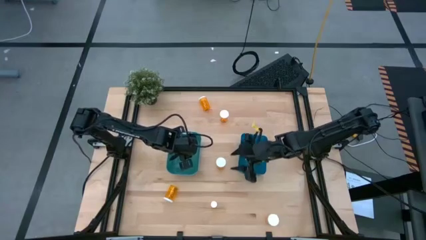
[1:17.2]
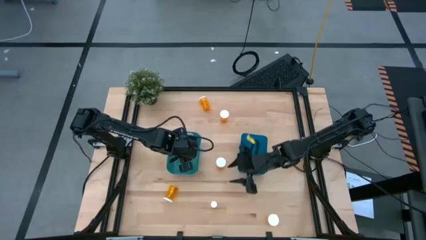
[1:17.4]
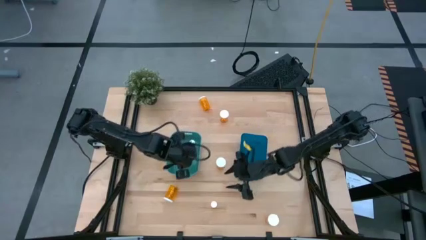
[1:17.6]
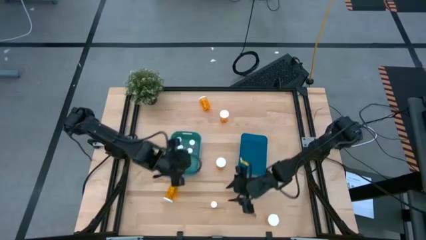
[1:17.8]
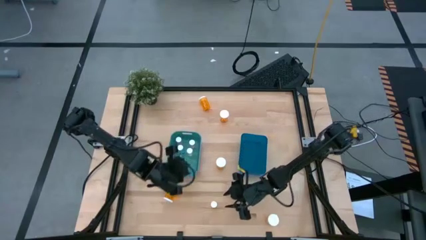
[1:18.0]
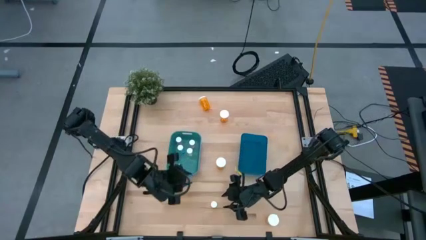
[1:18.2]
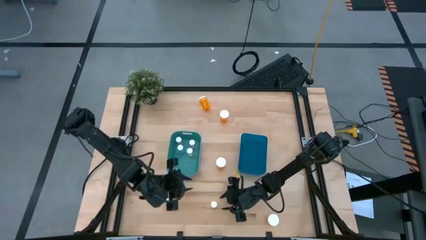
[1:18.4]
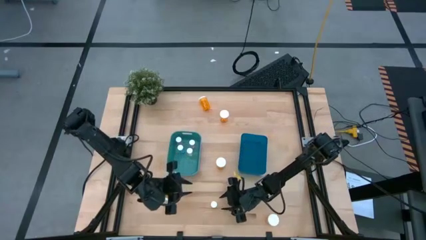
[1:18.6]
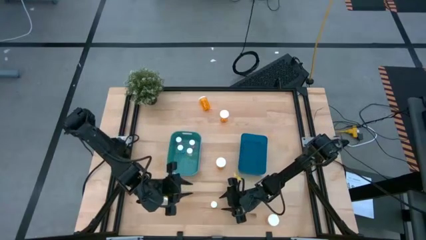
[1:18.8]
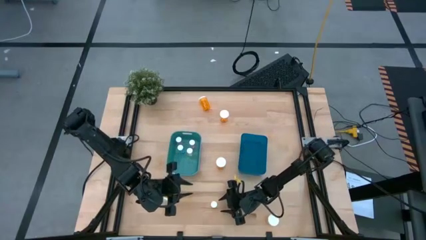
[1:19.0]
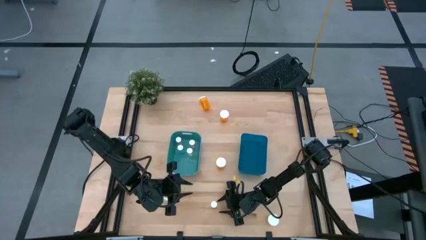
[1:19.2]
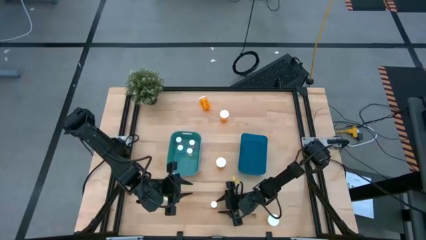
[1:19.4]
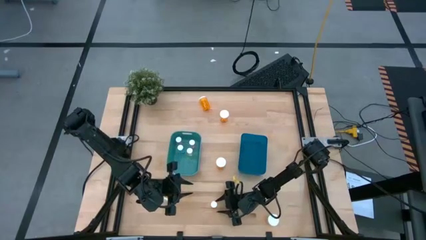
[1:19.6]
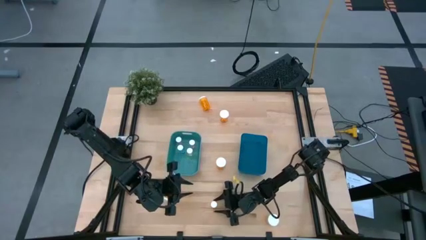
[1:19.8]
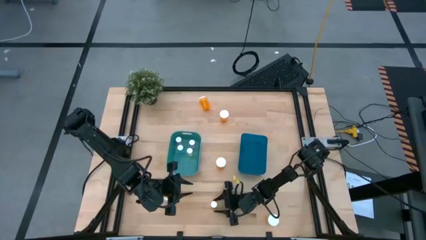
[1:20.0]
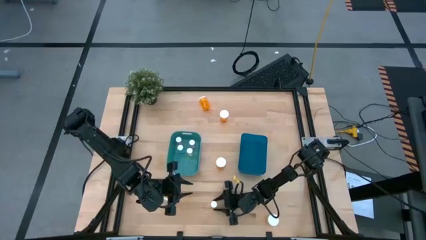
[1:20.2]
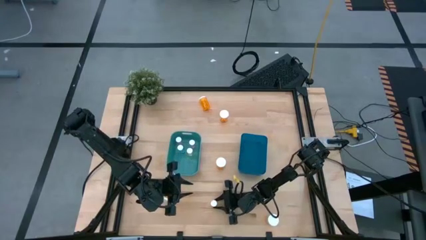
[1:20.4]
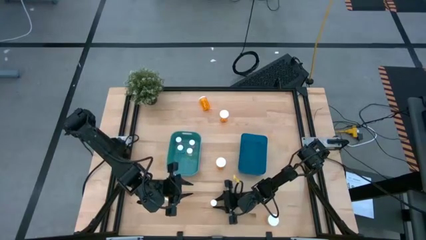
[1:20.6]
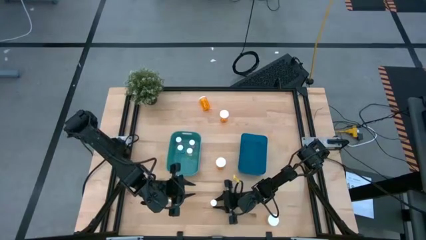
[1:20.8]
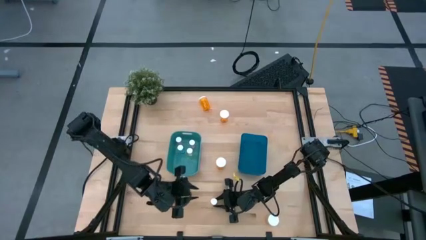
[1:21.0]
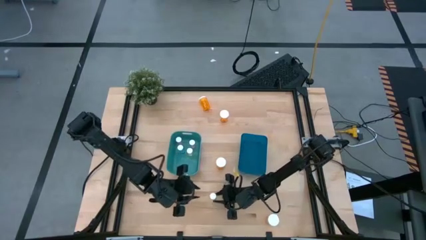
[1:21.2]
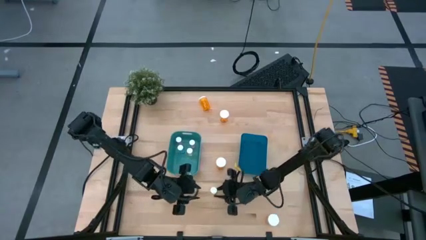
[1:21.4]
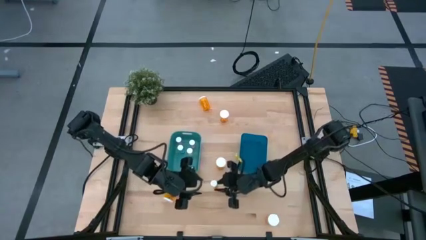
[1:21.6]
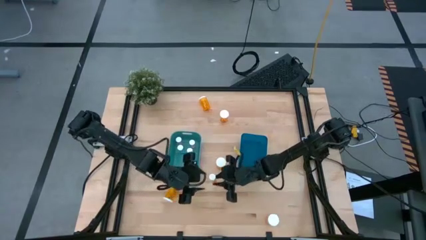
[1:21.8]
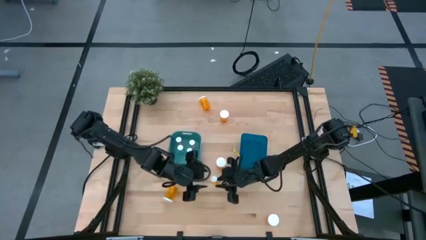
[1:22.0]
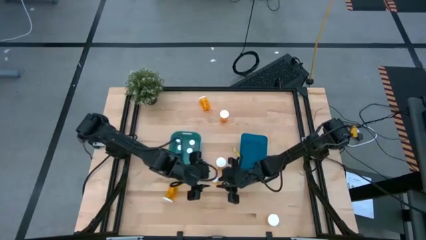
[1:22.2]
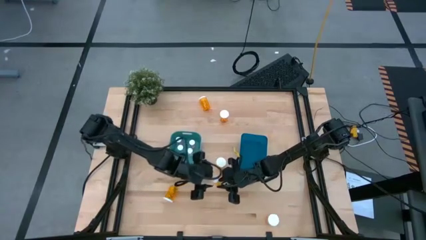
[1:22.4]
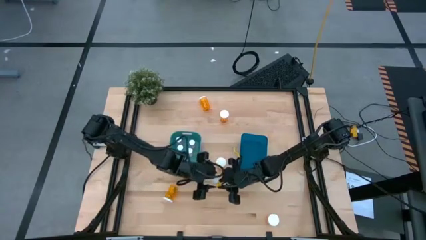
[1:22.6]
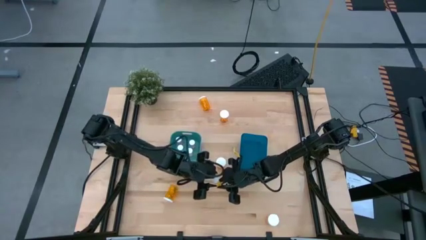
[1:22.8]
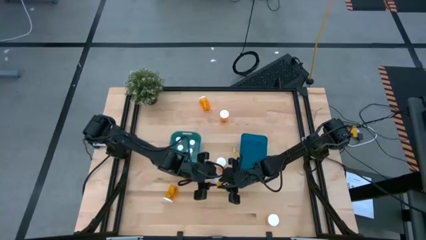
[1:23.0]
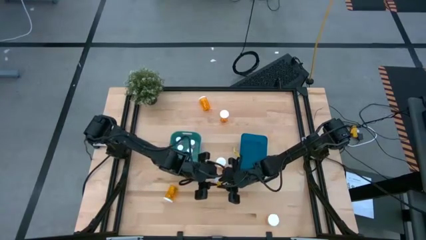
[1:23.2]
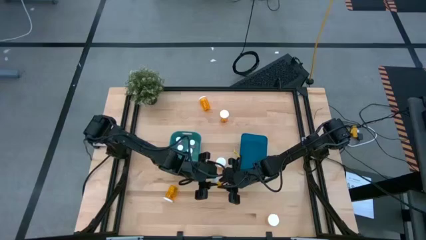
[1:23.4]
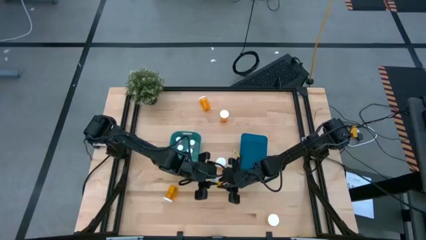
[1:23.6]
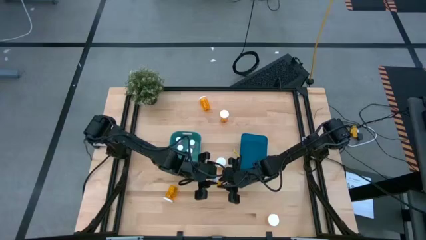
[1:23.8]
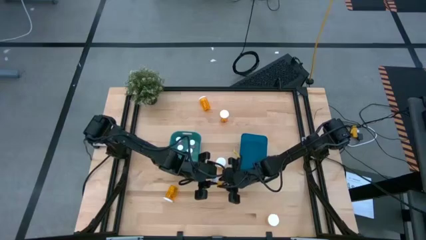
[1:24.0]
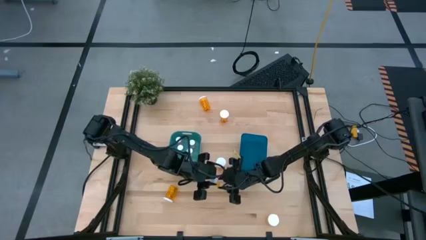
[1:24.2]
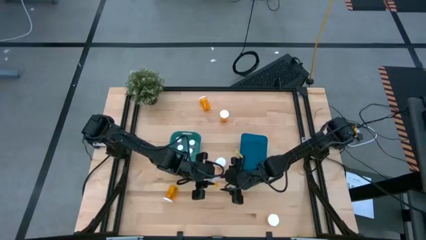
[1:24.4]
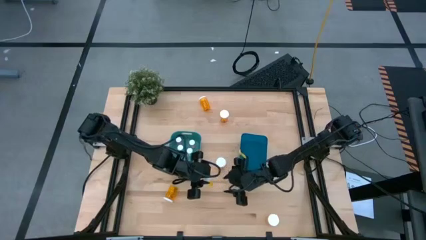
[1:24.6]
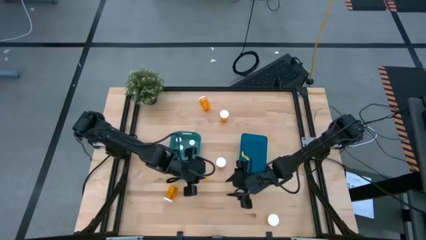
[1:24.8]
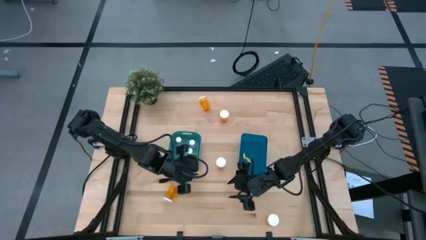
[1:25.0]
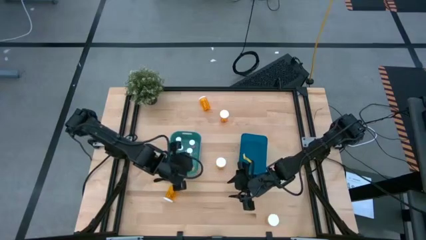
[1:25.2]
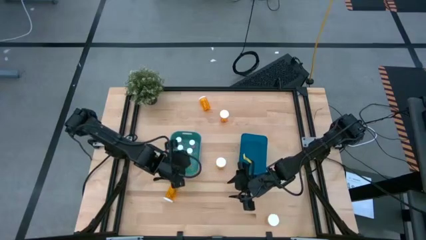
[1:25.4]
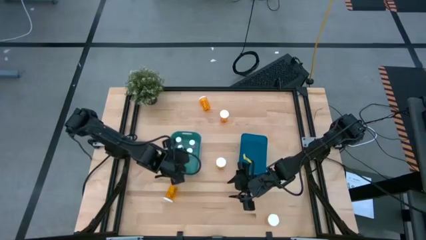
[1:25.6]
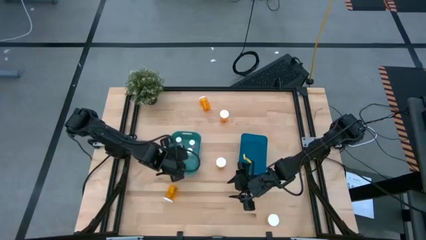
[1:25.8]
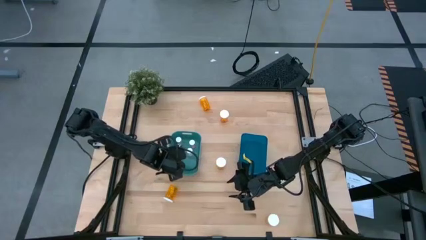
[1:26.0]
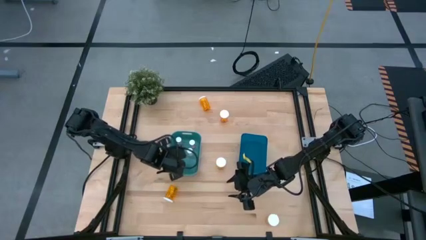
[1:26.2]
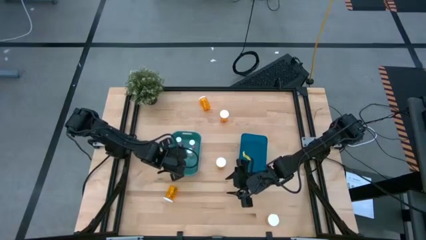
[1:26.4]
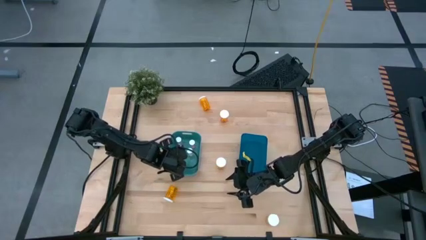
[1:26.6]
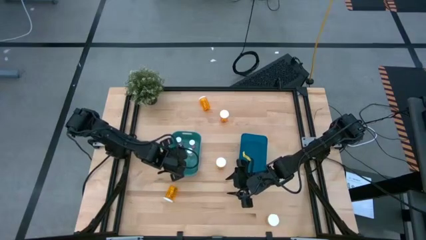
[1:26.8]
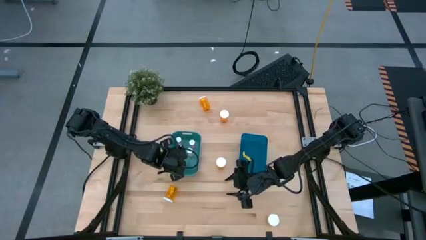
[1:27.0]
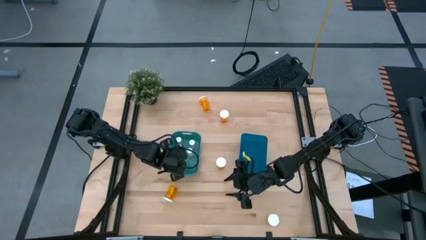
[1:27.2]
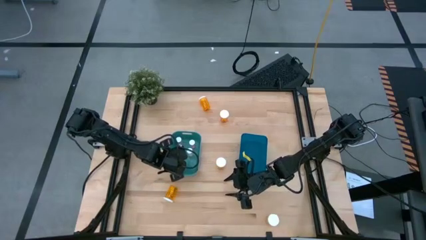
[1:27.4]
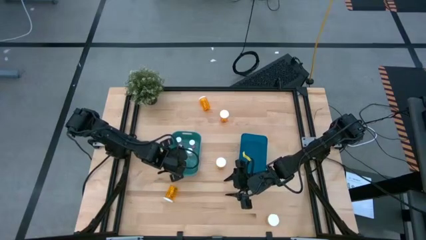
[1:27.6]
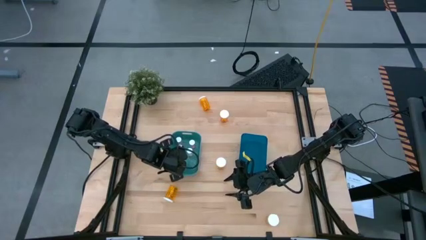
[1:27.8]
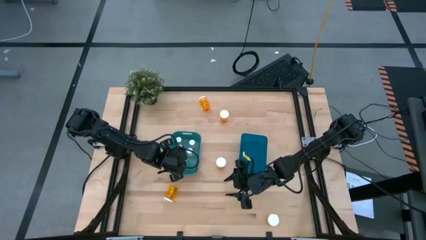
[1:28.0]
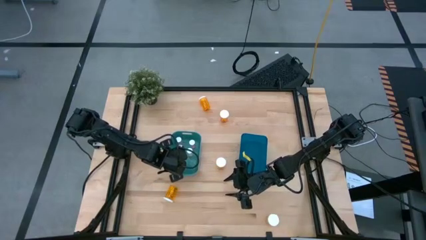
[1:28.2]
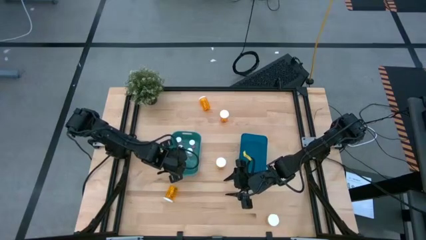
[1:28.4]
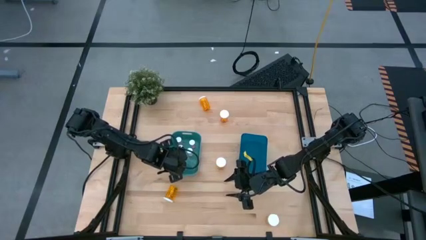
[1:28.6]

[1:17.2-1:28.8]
Task: Pick and place medicine bottles into bin by pill shape (circle, oval)
Put the small orange pill bottle into the green bin

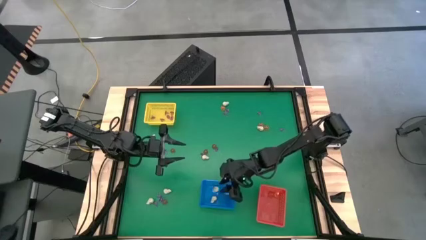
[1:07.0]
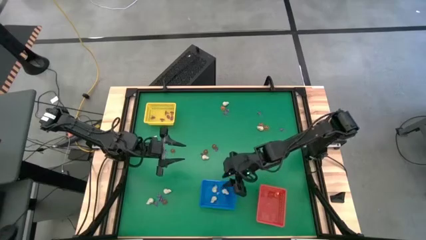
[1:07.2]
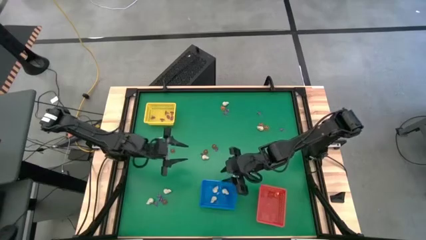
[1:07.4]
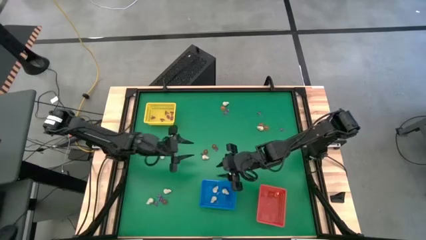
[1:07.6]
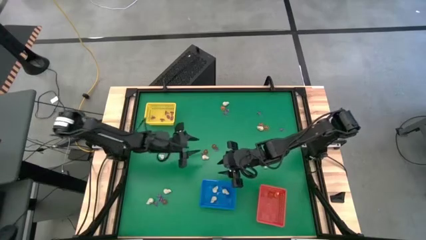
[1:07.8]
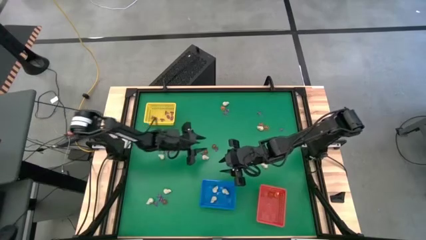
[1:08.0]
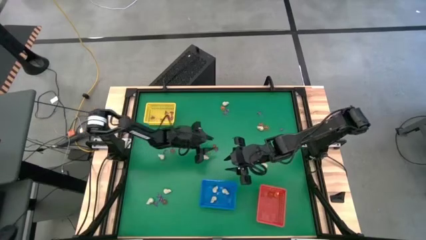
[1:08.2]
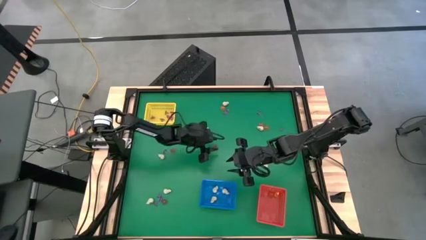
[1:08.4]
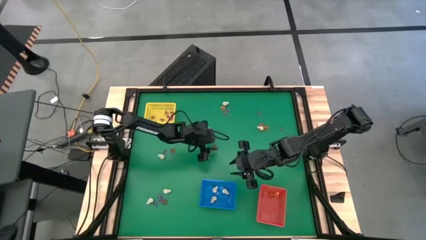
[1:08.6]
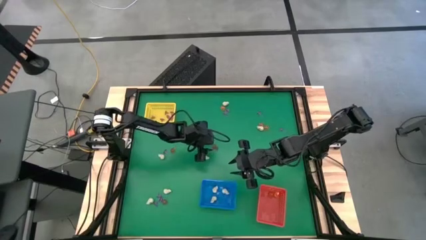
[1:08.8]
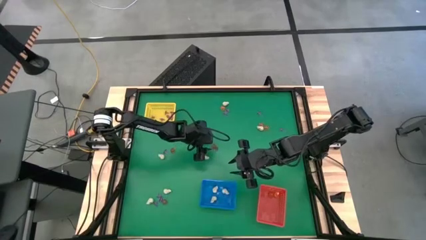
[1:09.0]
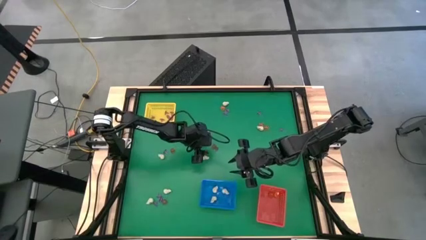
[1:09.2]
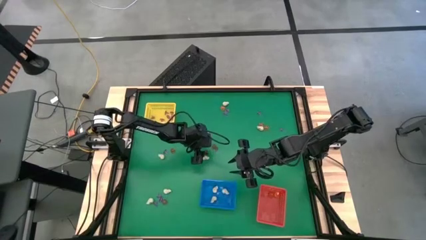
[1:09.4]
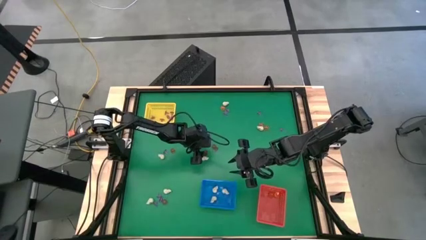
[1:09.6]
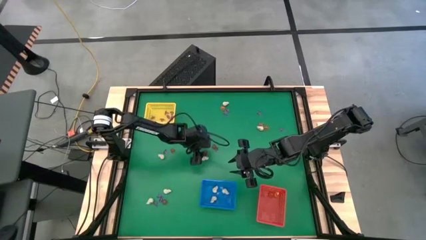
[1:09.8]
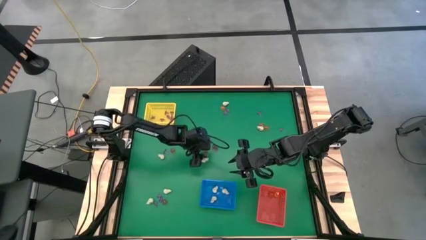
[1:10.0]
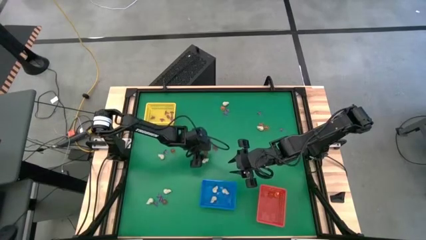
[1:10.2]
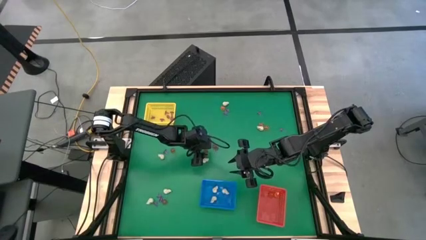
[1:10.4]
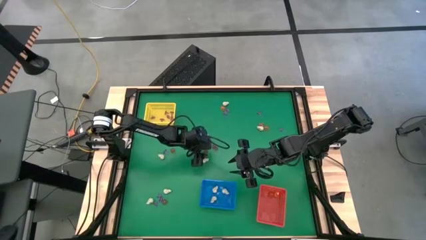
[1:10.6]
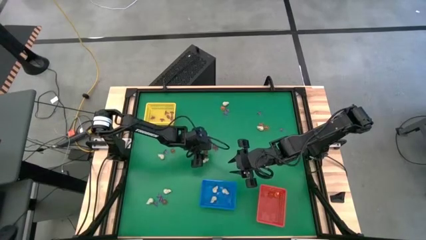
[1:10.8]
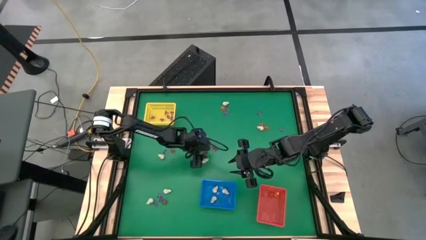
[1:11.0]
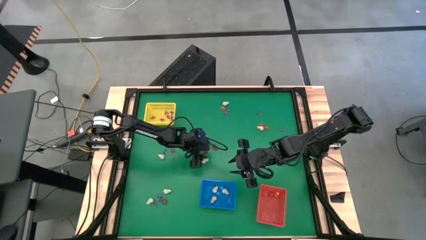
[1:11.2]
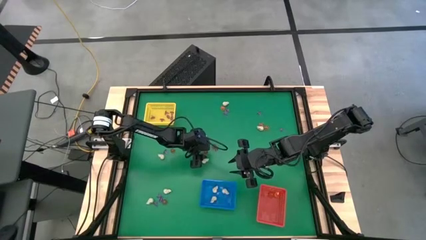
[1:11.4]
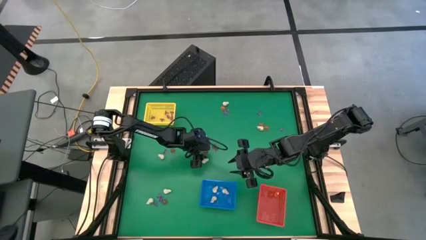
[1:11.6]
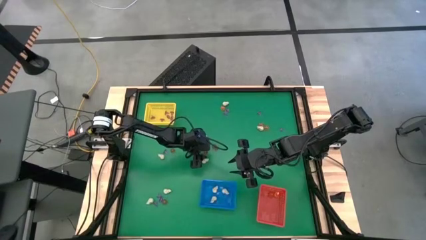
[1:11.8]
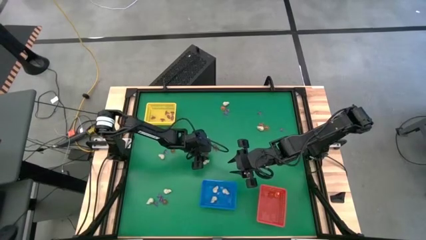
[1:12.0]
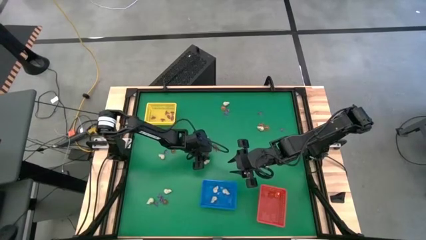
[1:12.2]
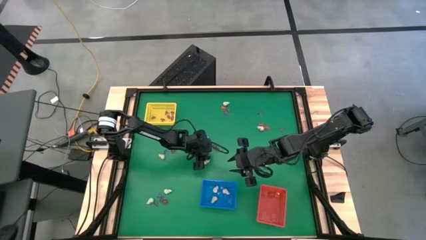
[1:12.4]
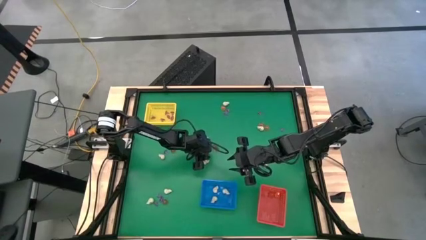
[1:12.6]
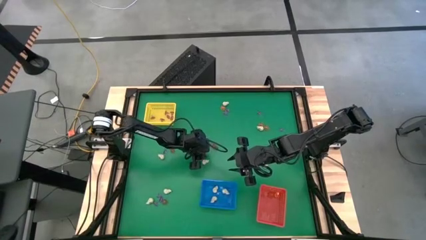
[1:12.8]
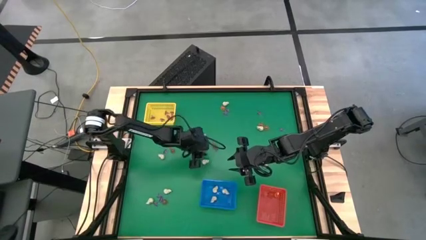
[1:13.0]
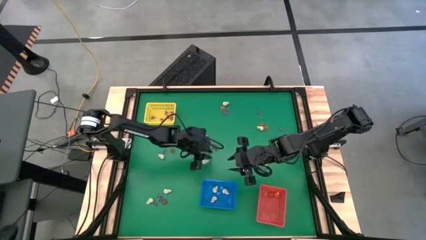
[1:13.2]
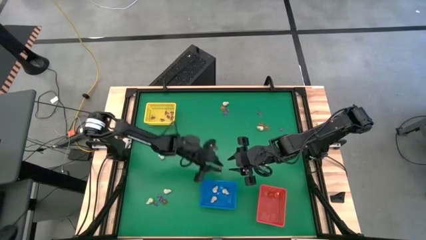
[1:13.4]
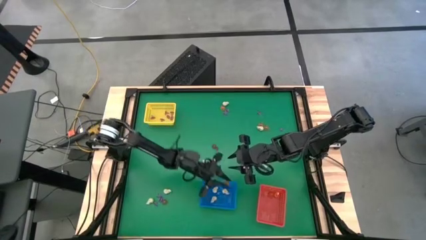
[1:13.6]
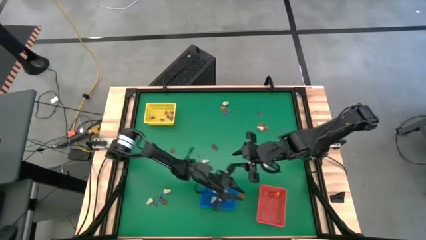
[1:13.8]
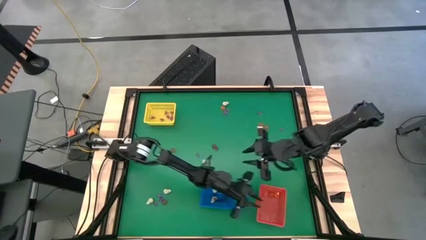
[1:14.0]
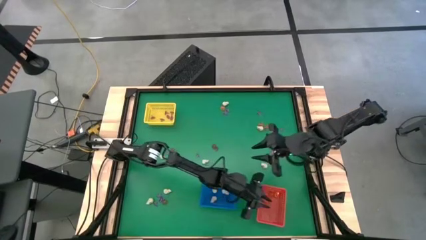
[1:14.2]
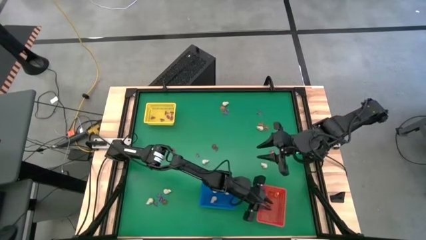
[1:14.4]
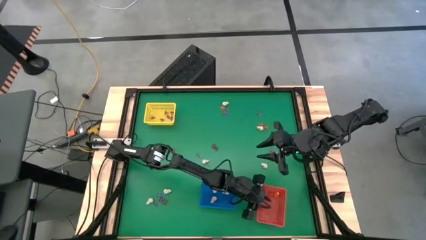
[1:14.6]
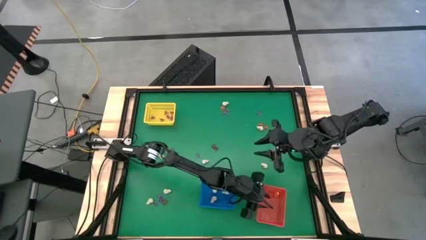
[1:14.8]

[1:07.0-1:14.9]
Task: Sort Halloween decoration
Put the orange pumpkin toy into the orange basket
